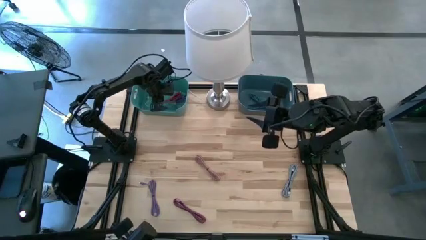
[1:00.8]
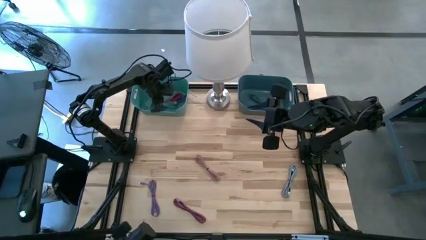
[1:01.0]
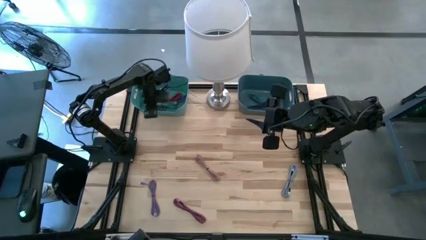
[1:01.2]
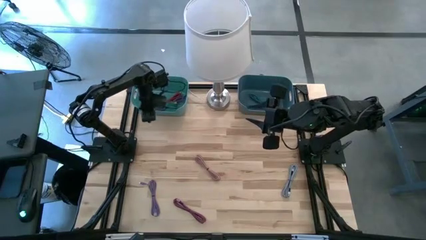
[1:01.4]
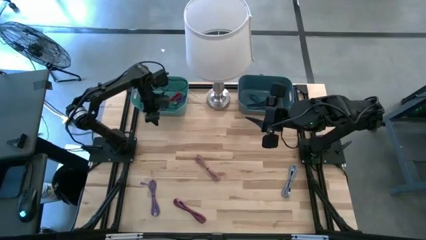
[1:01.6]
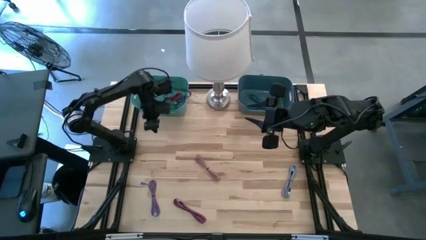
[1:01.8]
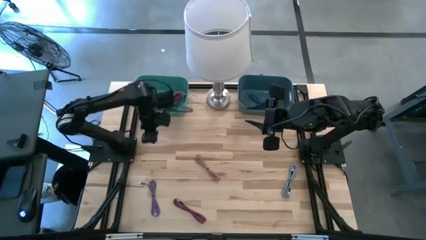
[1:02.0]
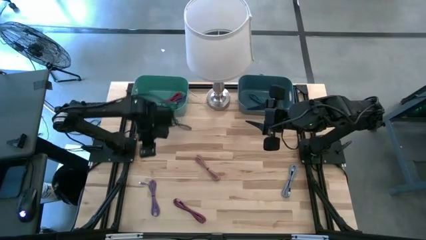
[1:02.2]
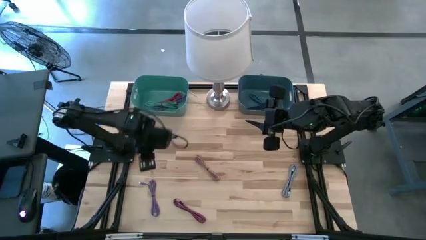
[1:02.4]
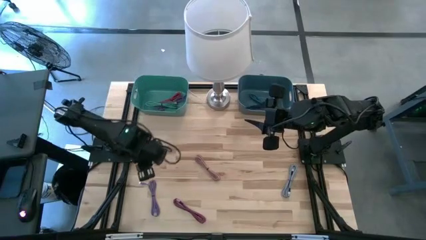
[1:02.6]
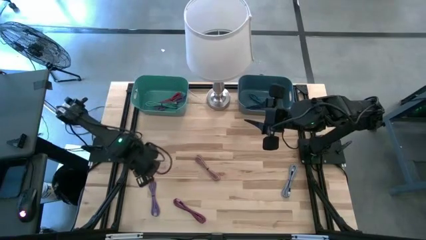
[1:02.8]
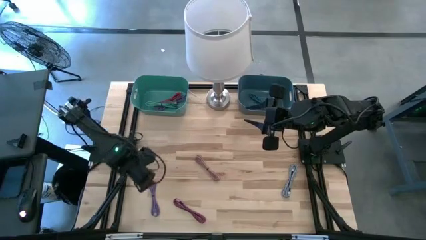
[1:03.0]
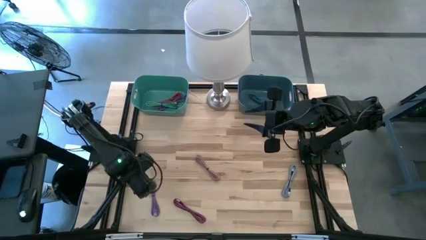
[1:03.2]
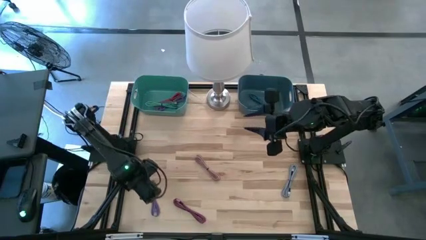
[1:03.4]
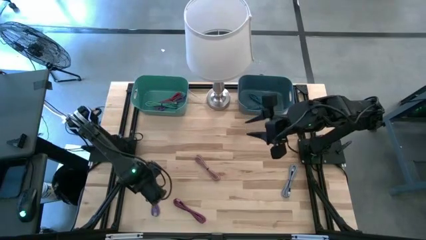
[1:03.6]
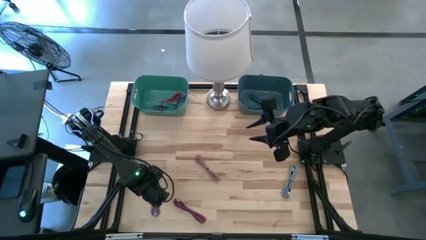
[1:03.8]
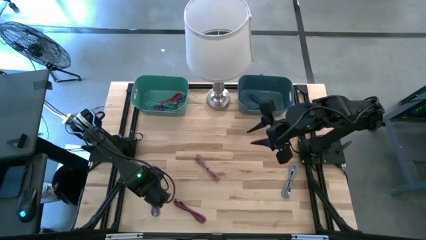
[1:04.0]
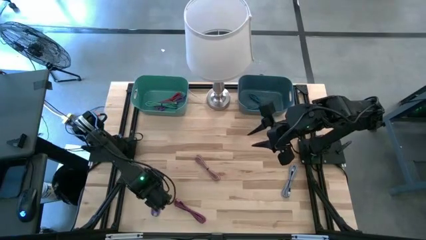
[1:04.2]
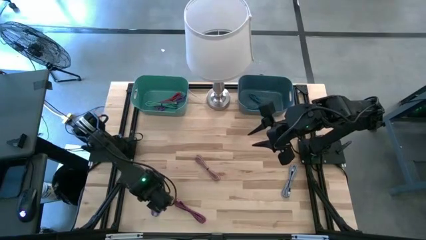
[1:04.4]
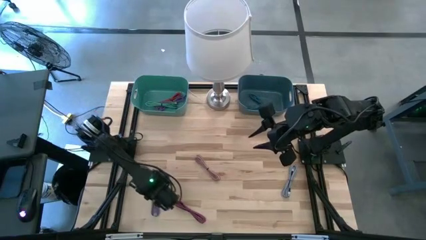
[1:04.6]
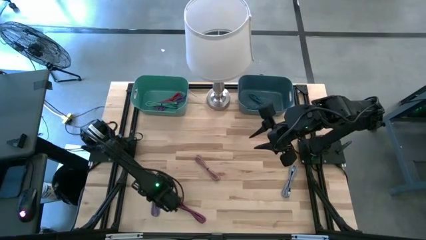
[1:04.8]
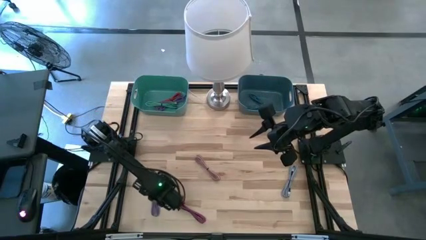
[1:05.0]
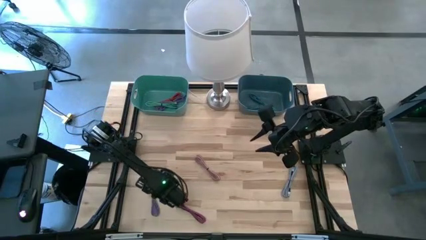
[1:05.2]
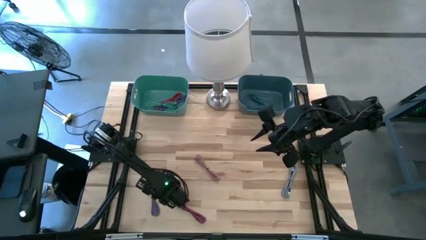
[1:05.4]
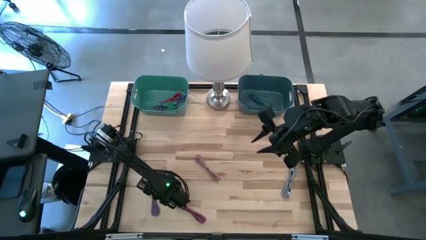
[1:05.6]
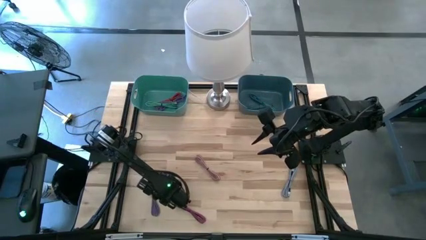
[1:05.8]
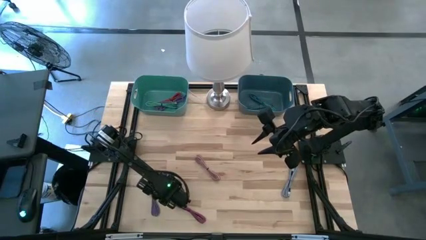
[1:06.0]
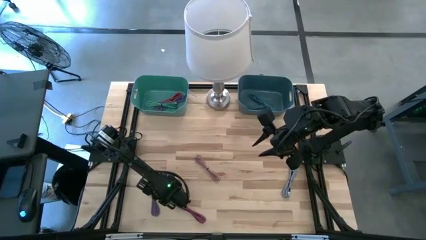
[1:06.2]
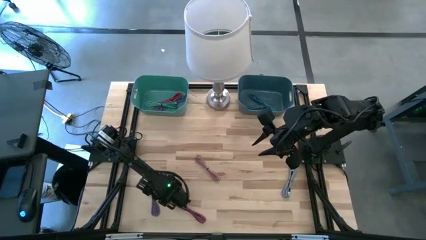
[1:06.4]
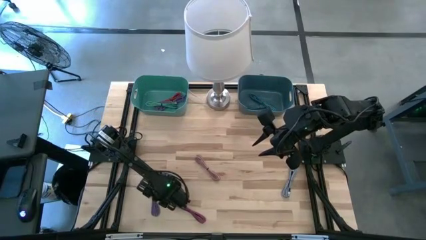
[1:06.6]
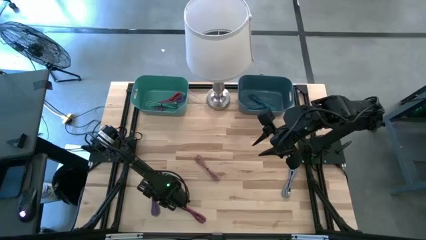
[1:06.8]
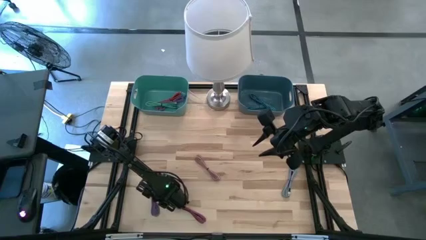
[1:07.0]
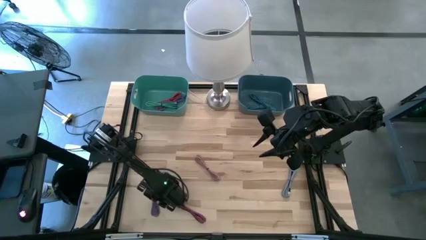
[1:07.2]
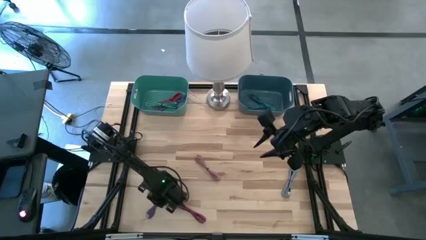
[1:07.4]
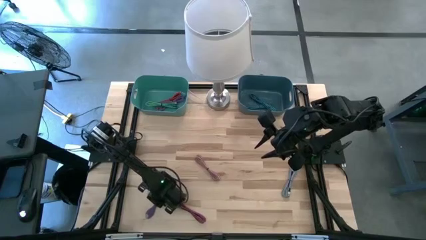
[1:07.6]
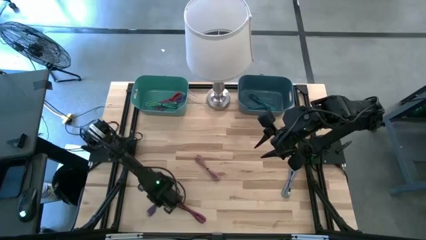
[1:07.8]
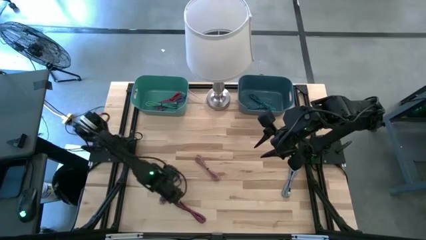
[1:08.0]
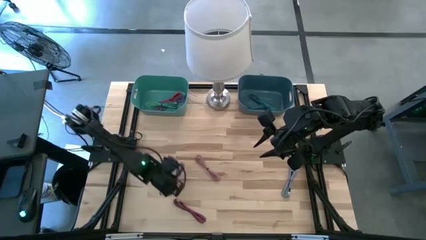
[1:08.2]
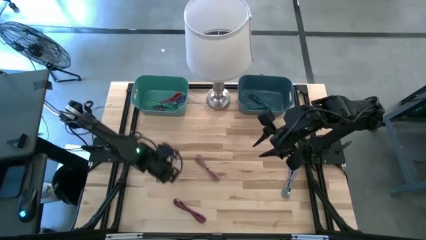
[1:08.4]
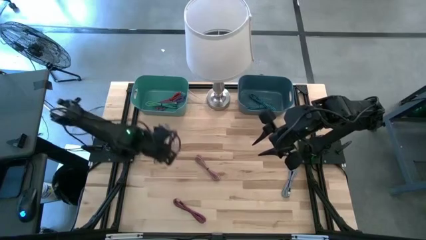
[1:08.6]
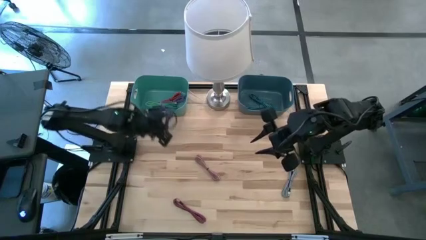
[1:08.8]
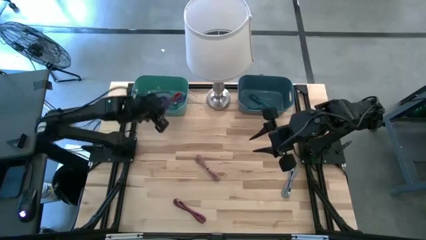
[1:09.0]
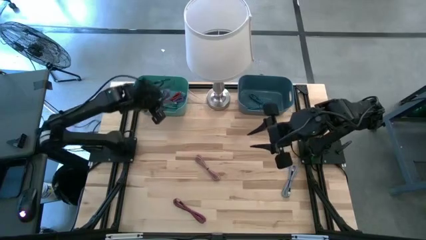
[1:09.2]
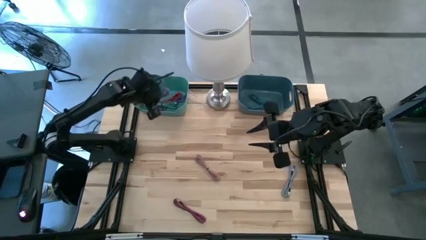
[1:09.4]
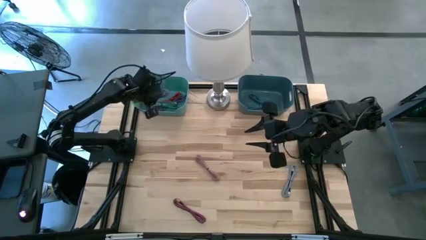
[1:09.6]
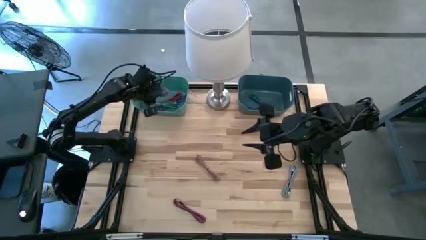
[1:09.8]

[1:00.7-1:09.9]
Task: Pick & Place USB Port
Put the purple charger cable into the green bin

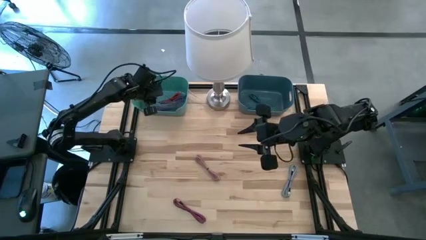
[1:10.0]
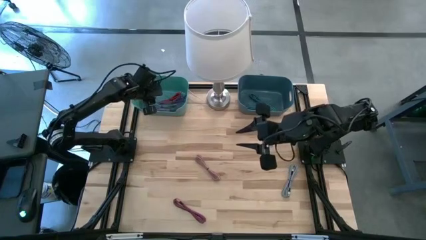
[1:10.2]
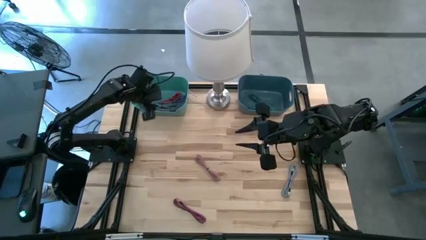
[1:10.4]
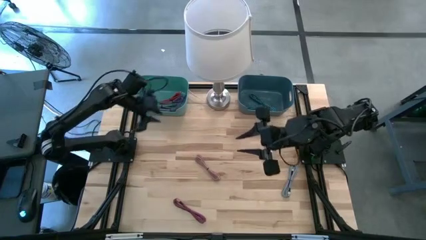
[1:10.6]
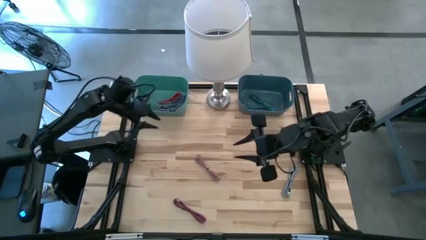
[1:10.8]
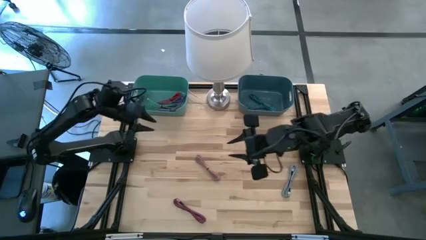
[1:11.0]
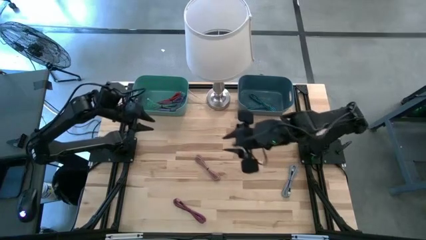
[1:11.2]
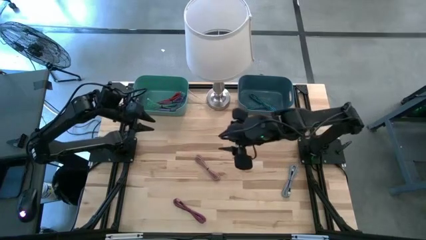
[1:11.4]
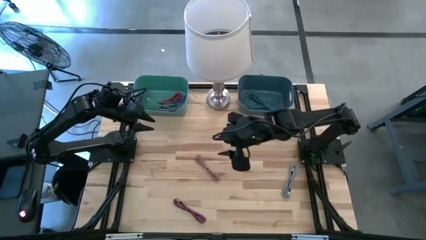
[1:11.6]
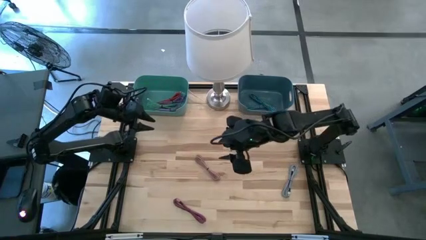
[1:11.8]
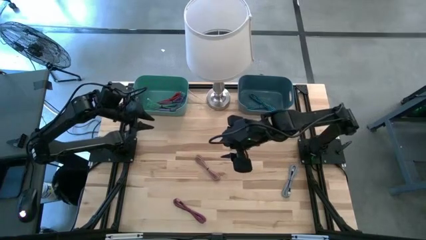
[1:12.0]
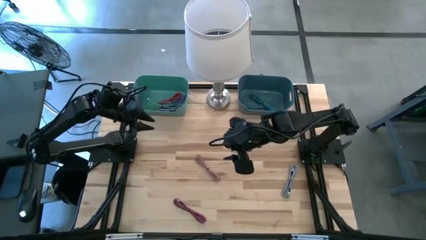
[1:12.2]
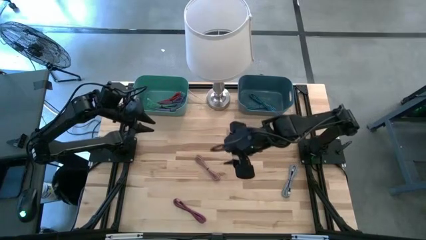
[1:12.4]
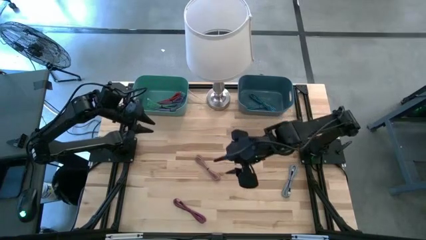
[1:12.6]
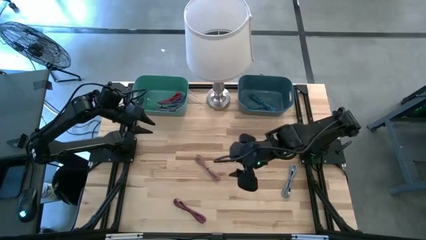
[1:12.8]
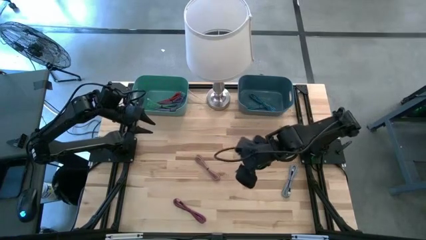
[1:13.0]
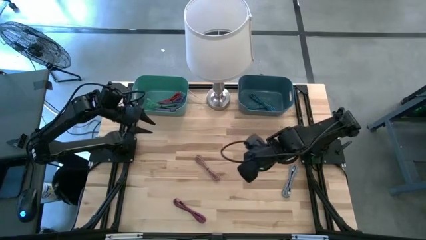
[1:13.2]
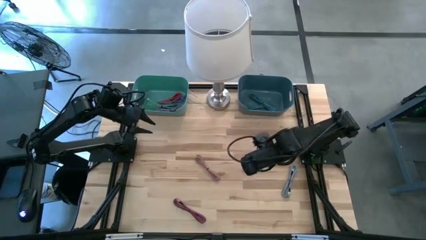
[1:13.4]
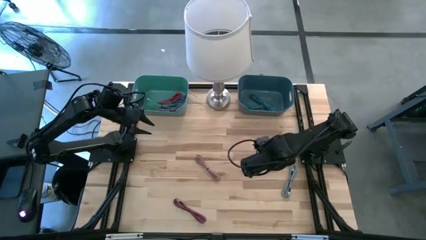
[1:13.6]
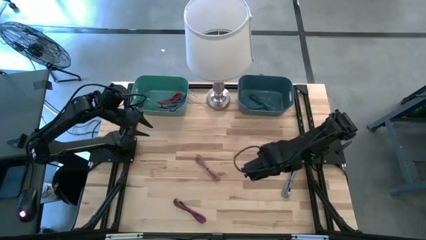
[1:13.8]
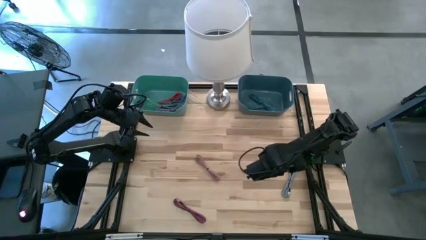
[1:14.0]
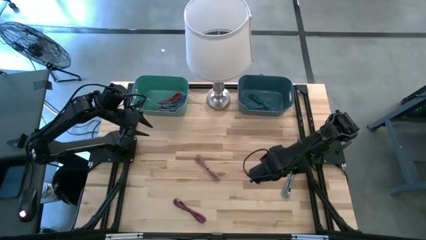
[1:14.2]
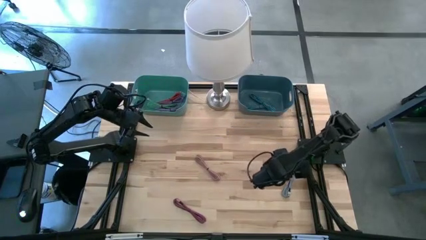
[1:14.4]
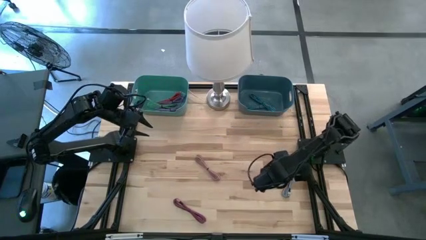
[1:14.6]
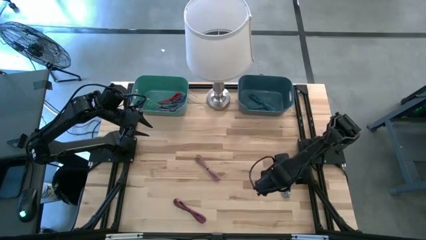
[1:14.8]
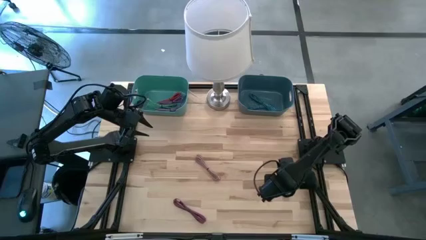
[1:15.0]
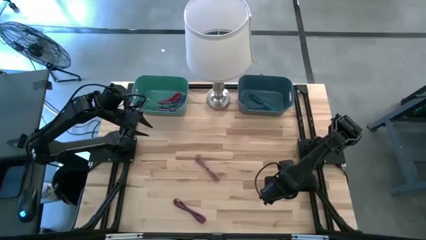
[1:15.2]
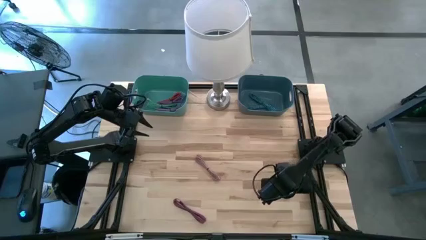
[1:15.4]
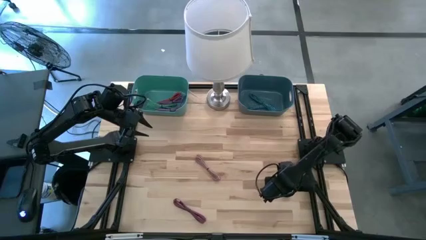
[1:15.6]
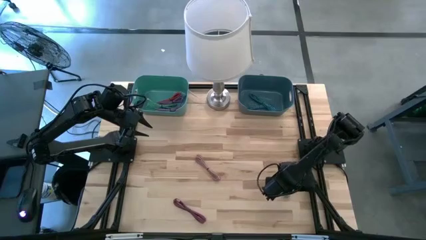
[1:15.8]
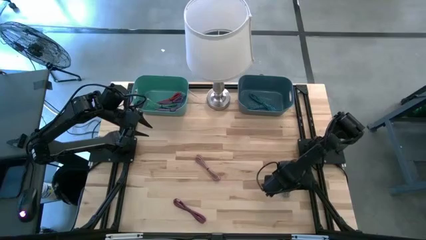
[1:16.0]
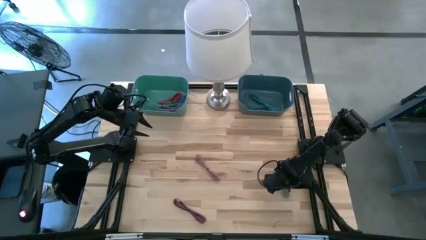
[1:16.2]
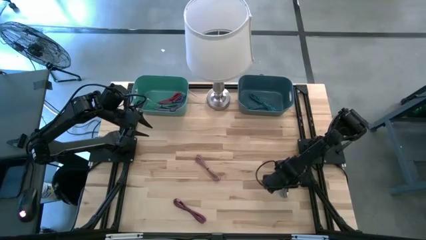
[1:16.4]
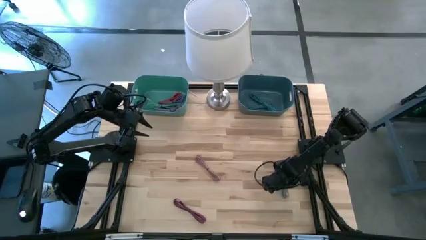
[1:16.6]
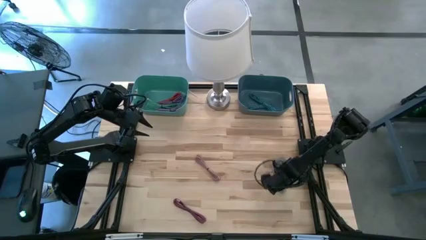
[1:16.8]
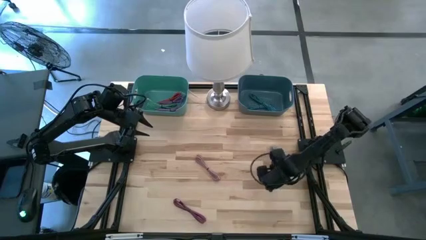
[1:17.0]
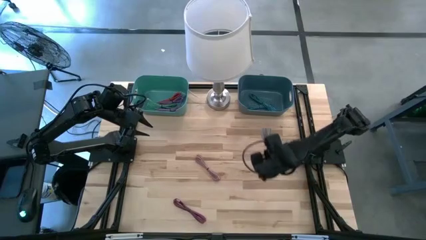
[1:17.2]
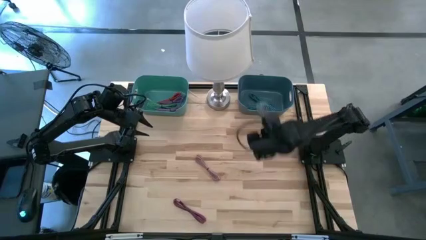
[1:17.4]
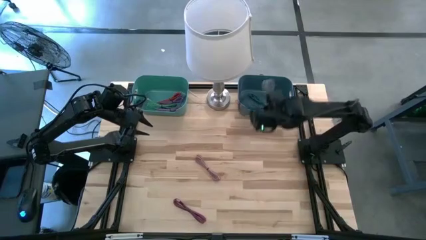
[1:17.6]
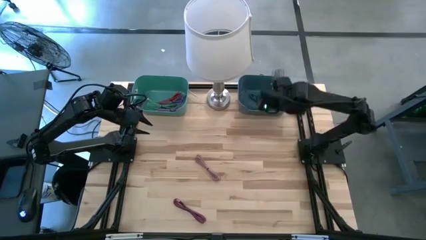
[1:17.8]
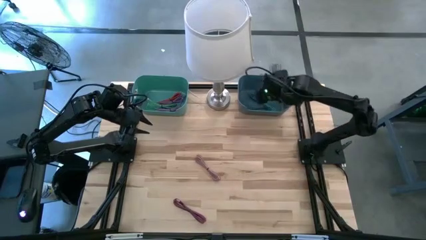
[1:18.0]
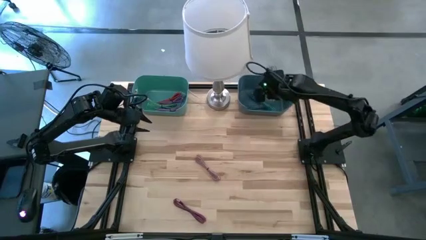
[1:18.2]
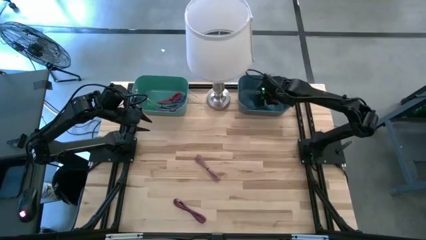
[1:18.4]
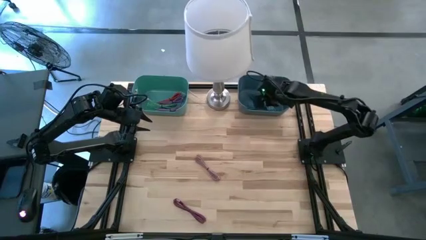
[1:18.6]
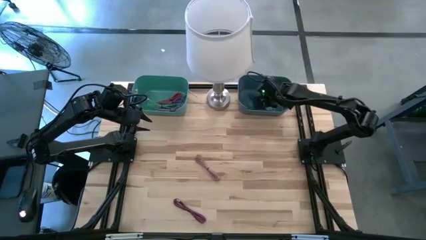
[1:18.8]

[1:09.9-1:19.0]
Put the white and black charger cable into the blue bin
